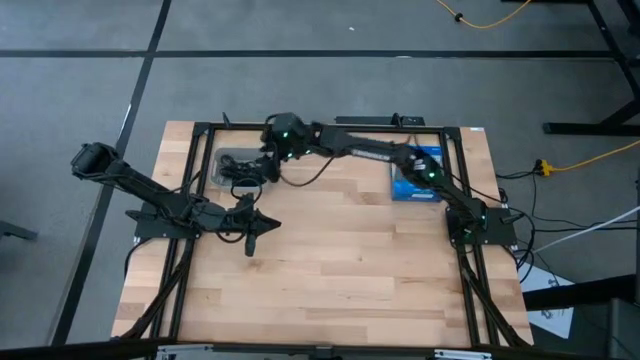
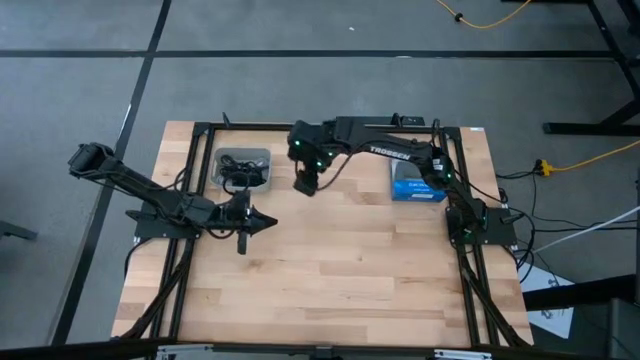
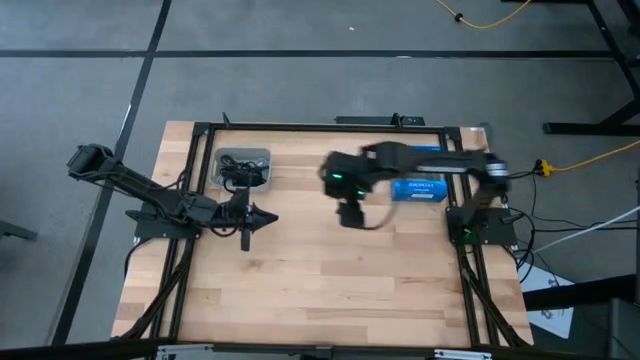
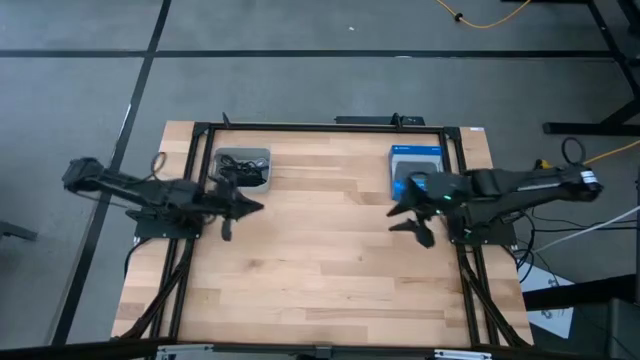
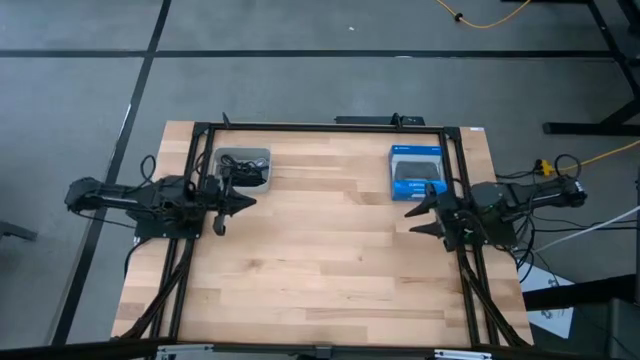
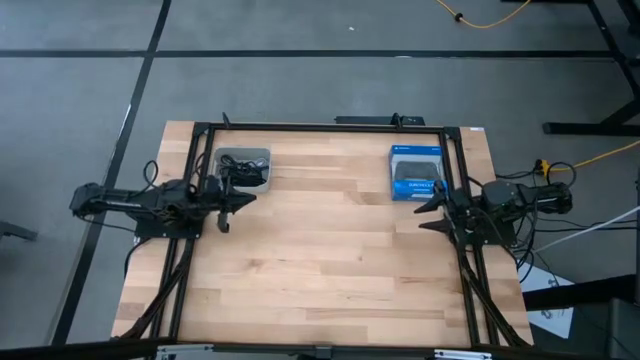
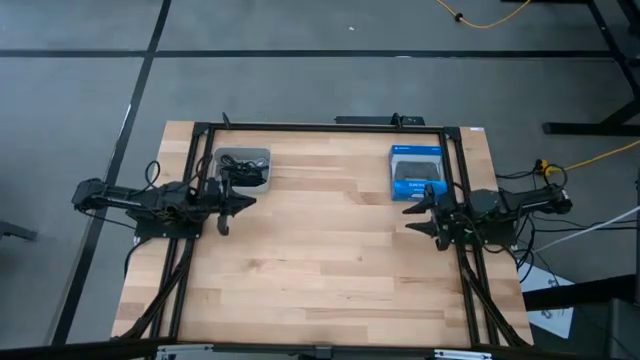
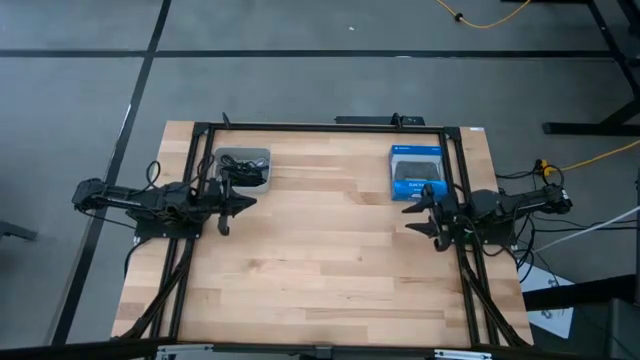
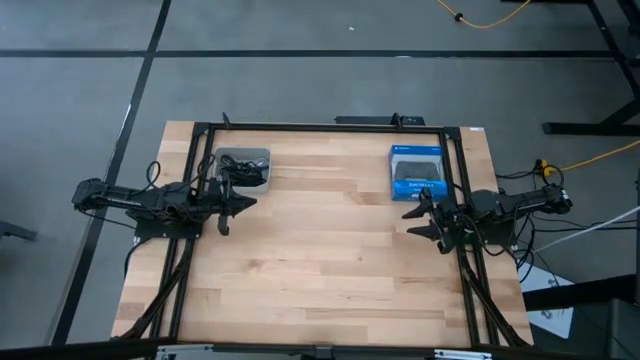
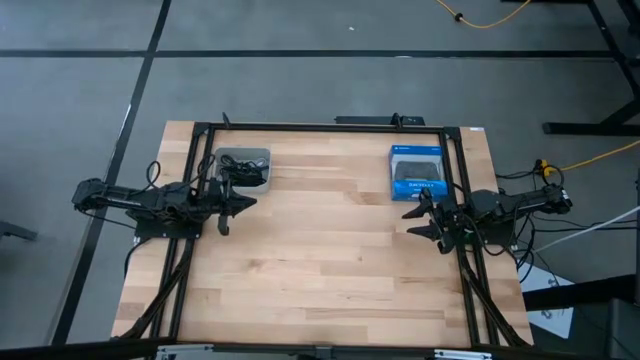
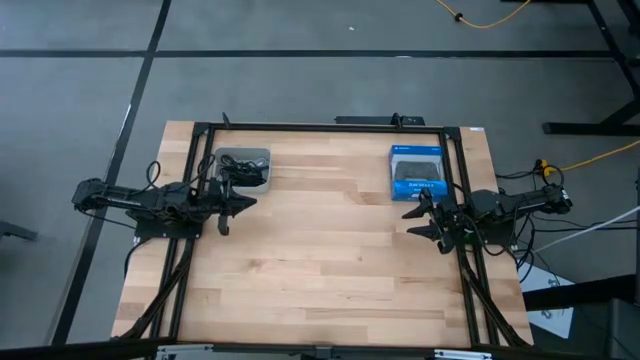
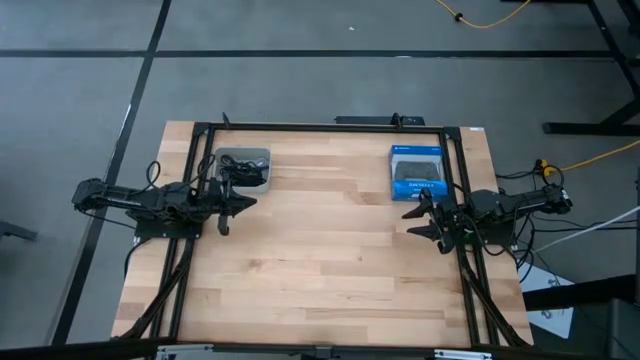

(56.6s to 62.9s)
Task: Pick and place USB-C Cables
Return to Home Position

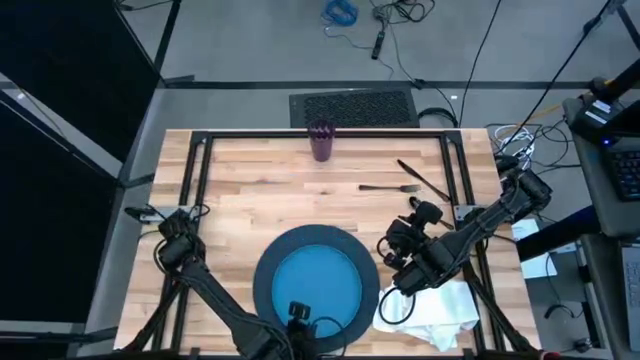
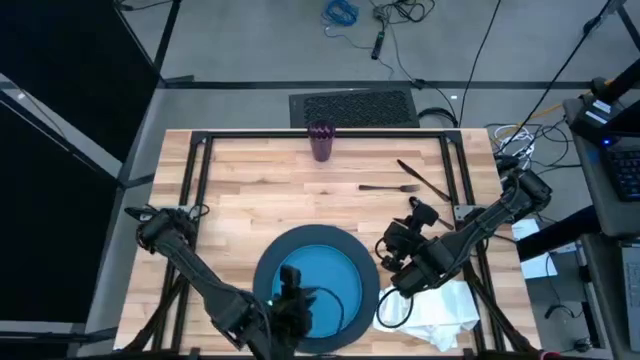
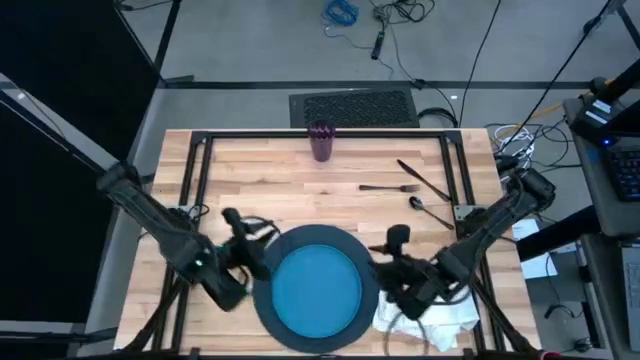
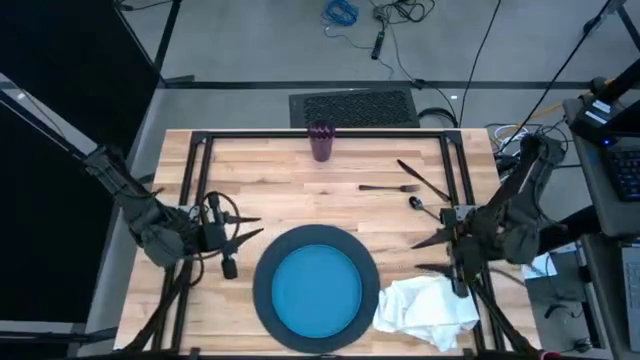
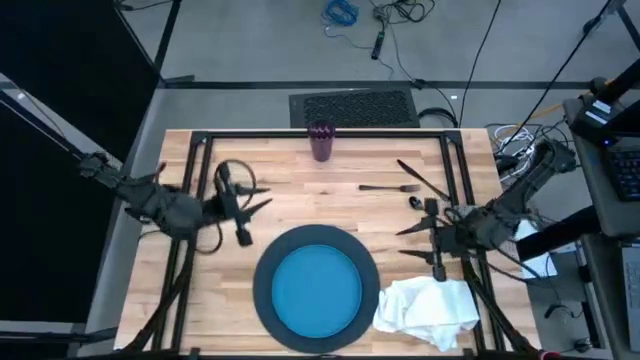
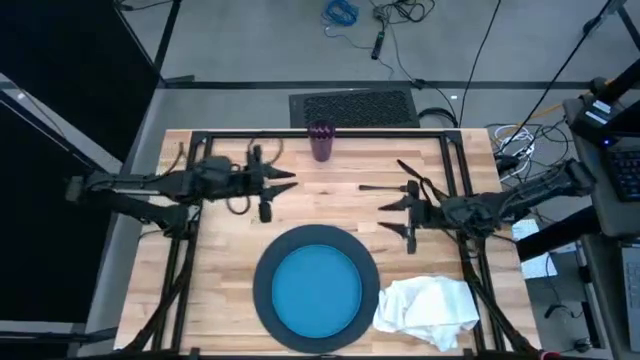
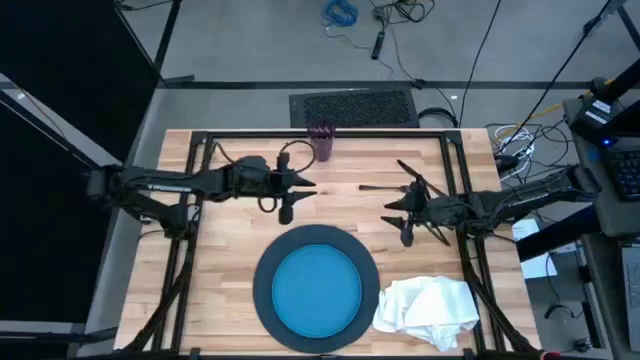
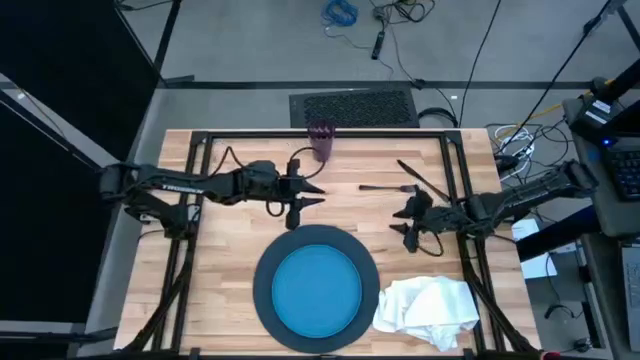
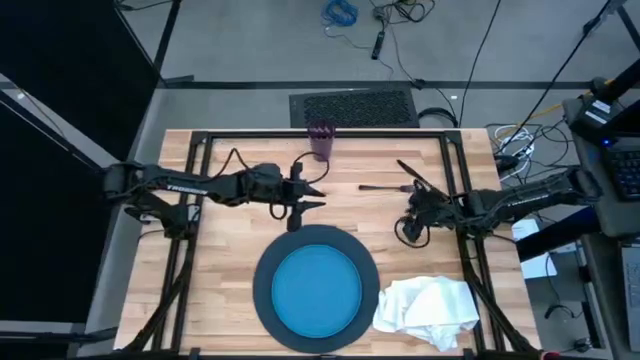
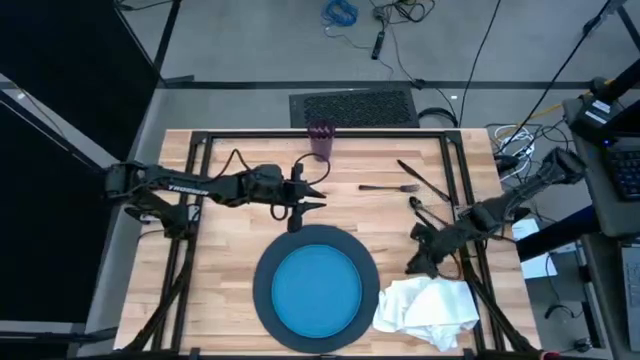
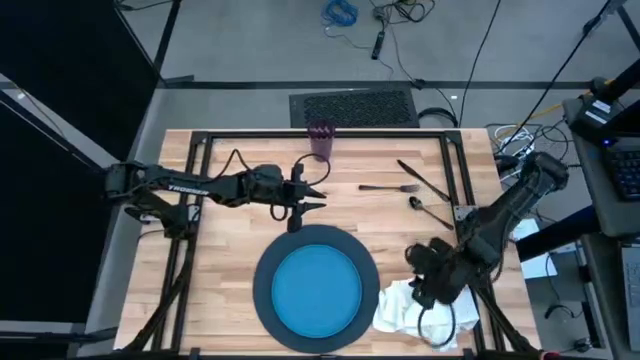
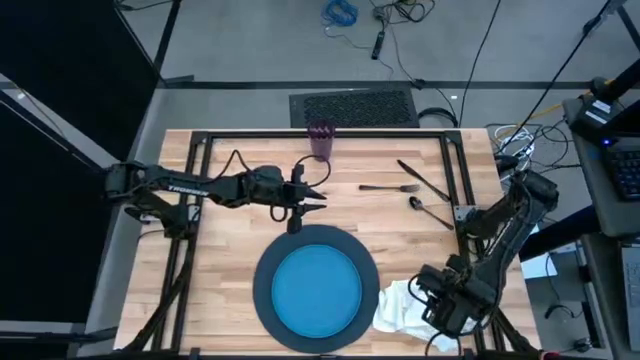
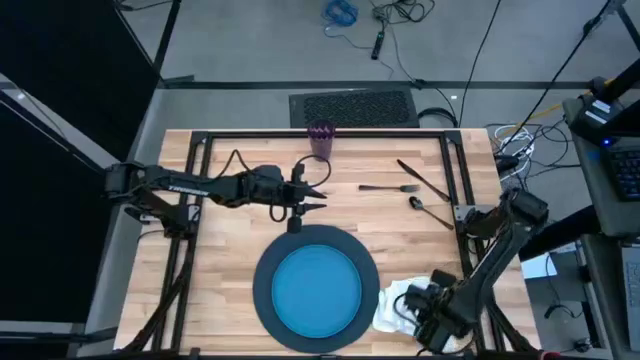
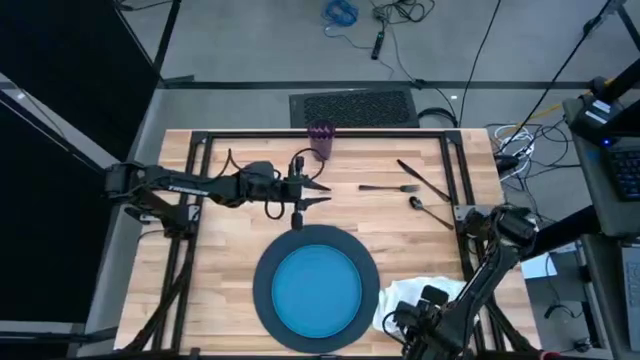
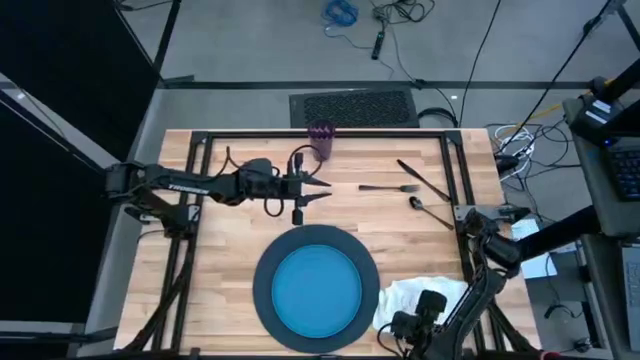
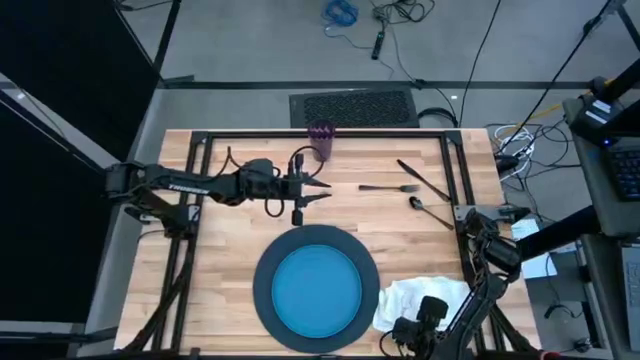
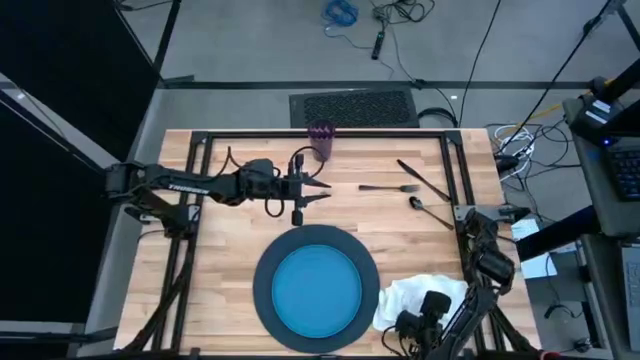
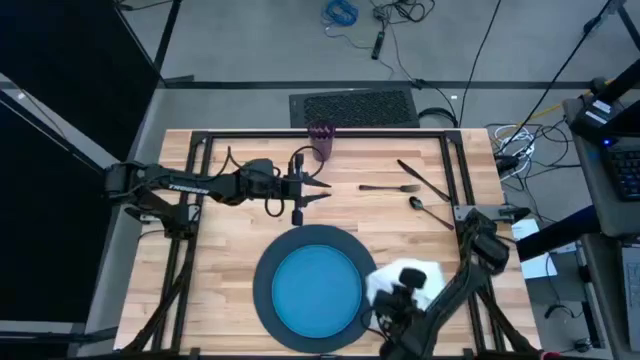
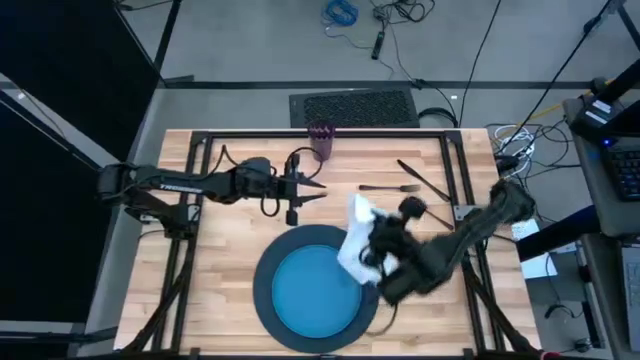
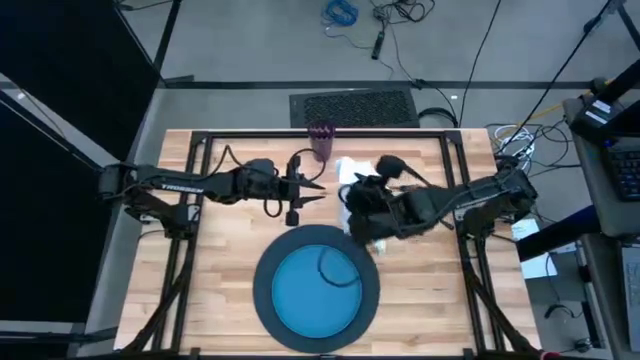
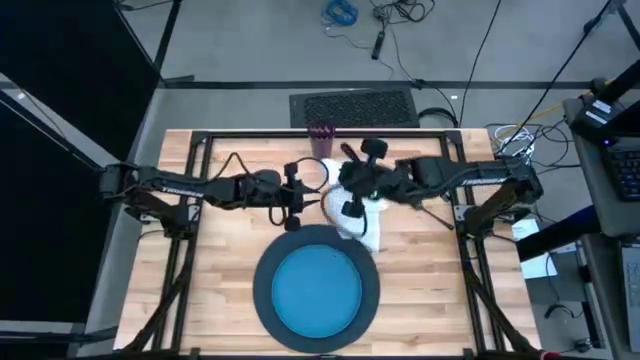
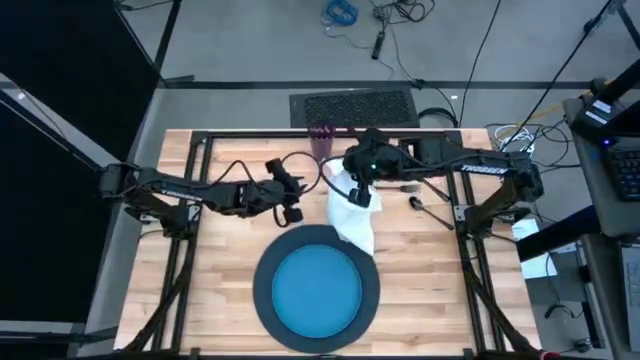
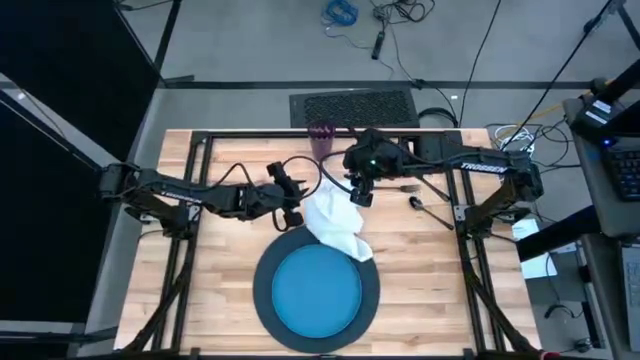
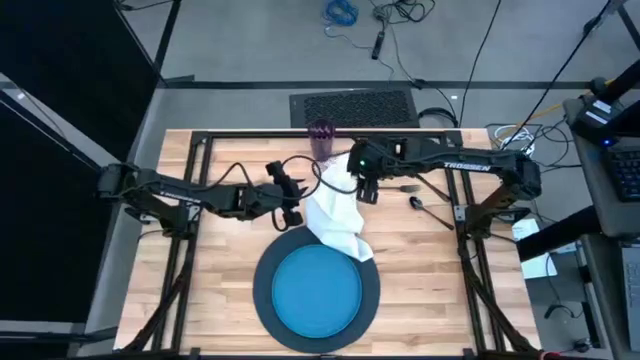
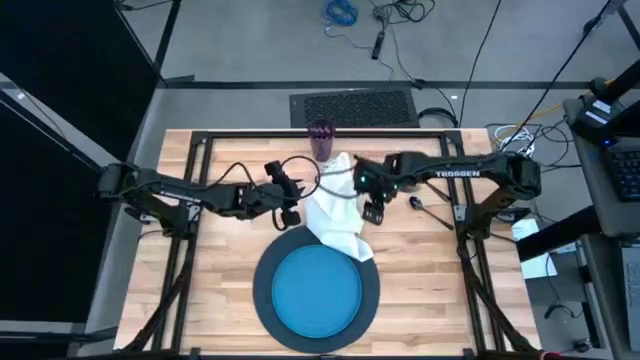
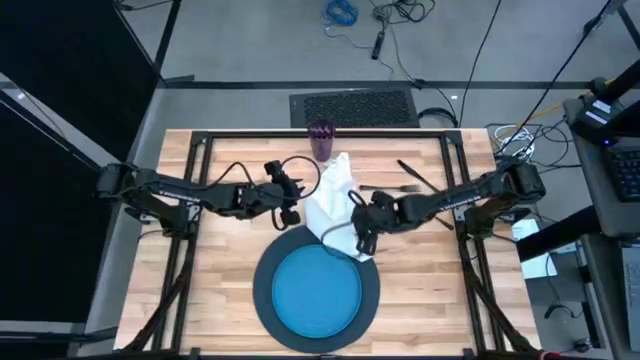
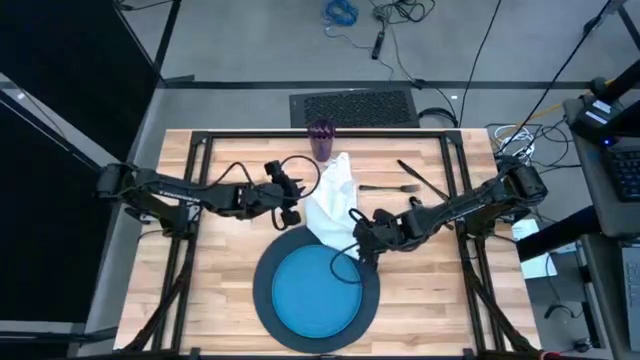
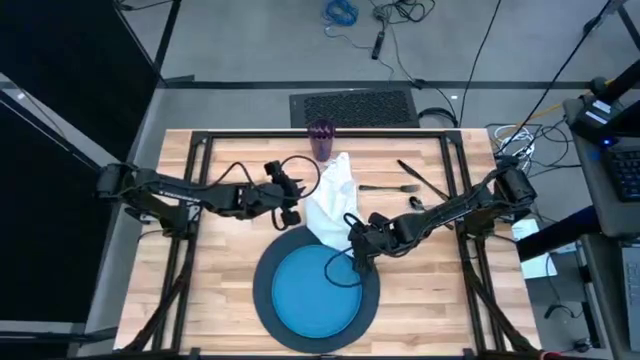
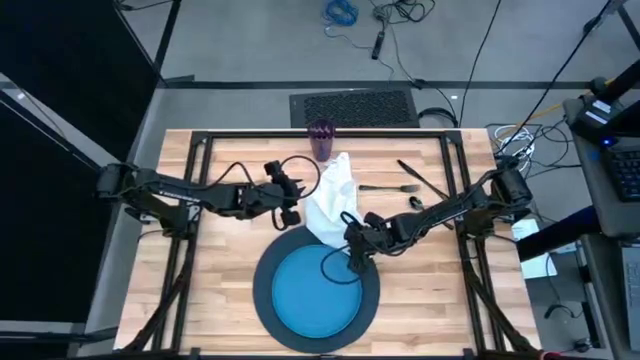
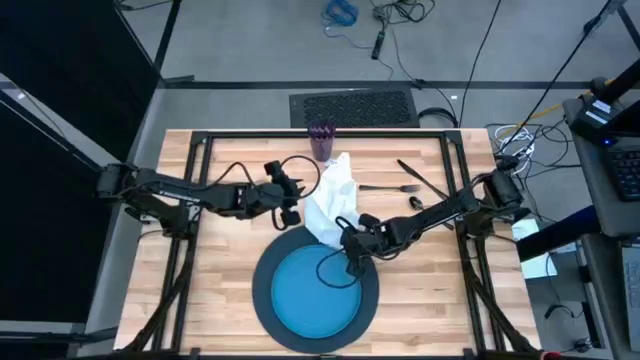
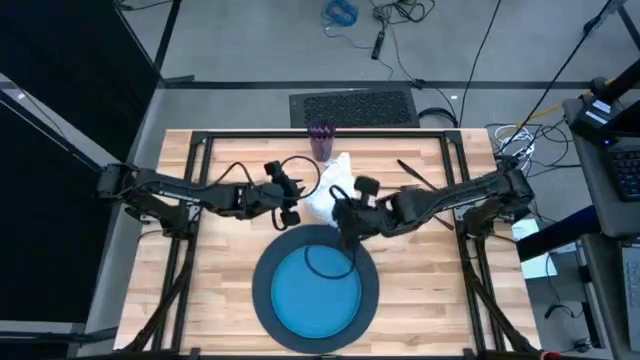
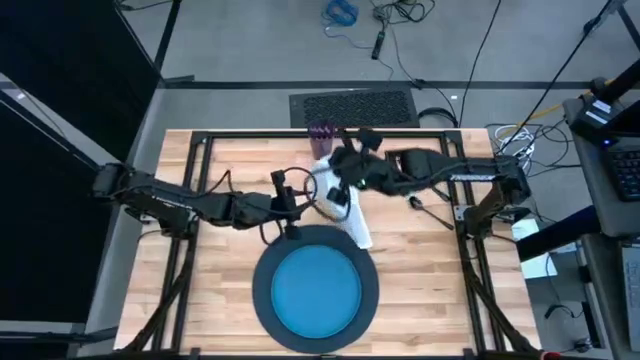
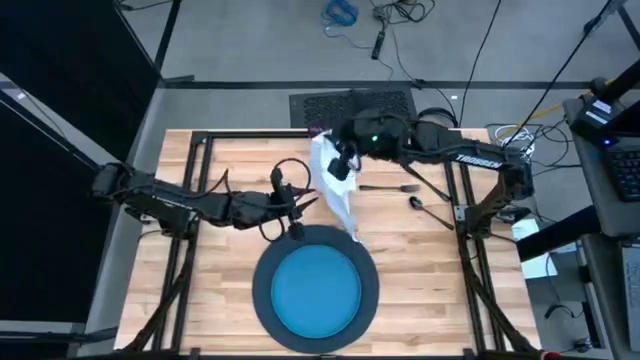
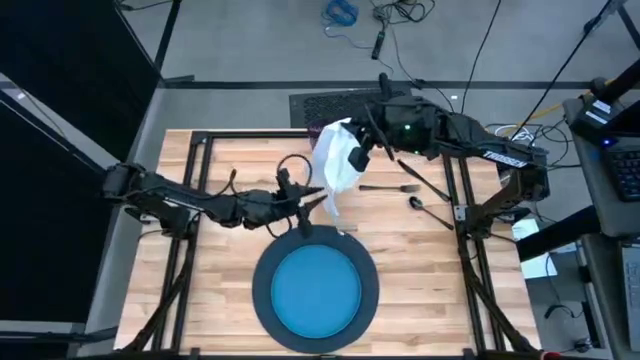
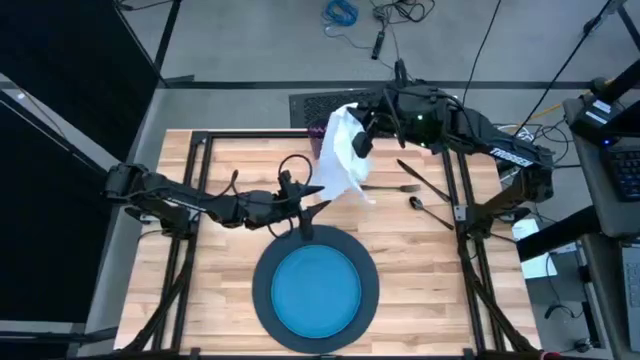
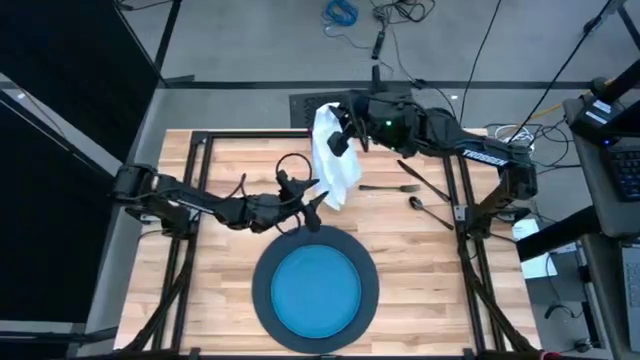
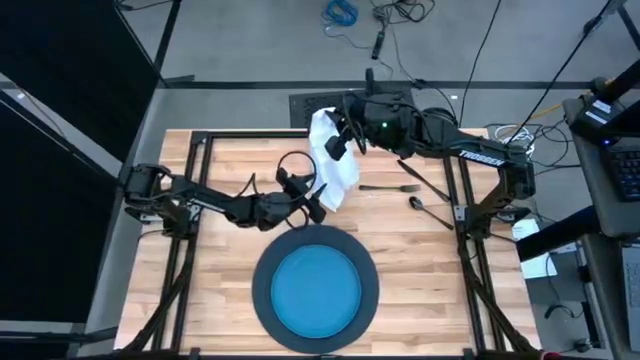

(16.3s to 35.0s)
Task: Set table place
Fold the white table napkin on the table
